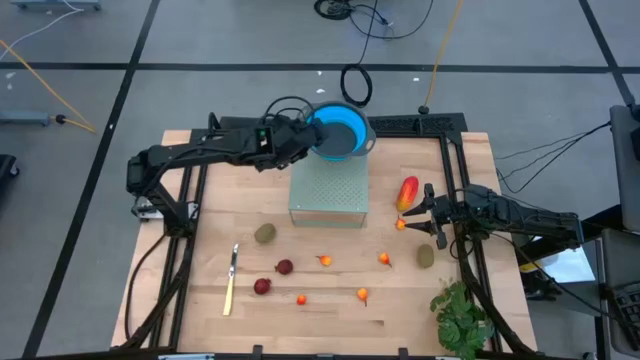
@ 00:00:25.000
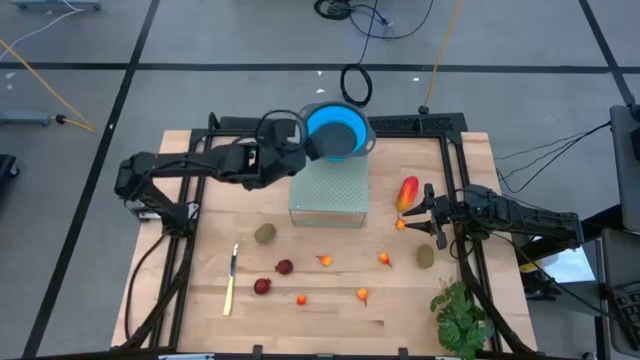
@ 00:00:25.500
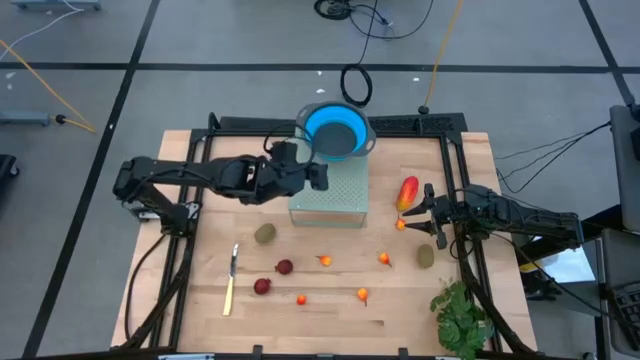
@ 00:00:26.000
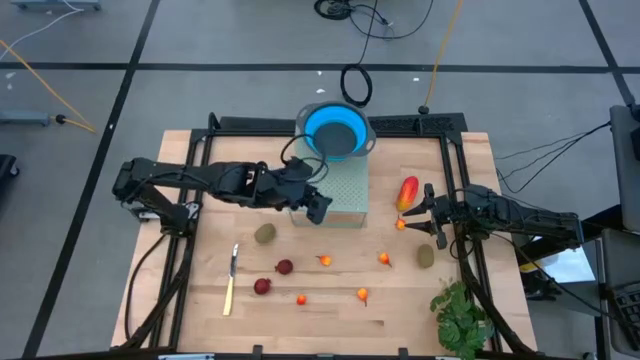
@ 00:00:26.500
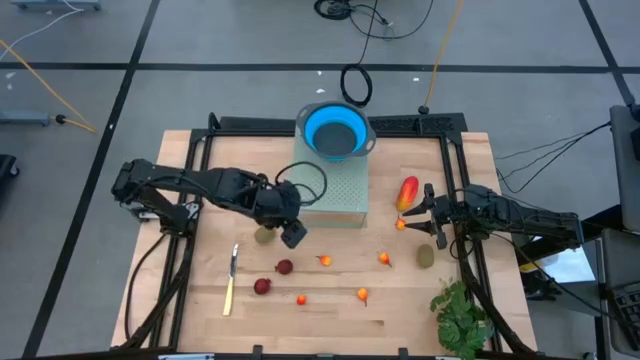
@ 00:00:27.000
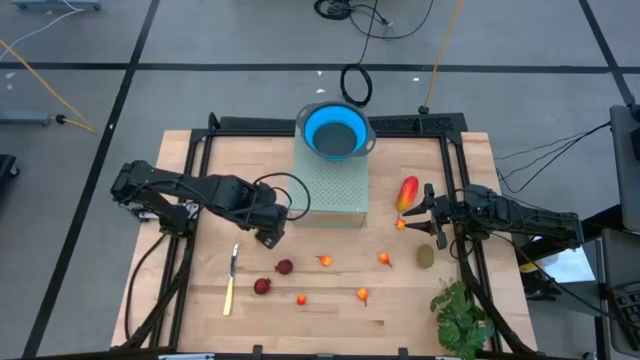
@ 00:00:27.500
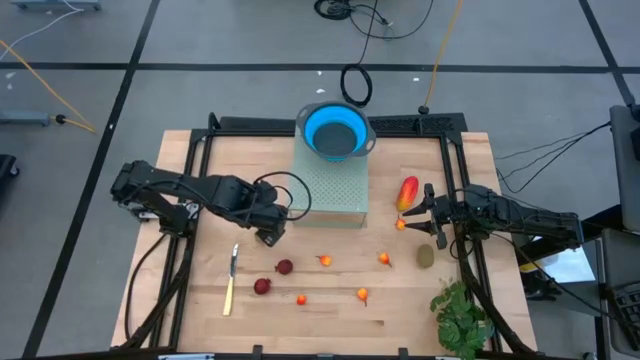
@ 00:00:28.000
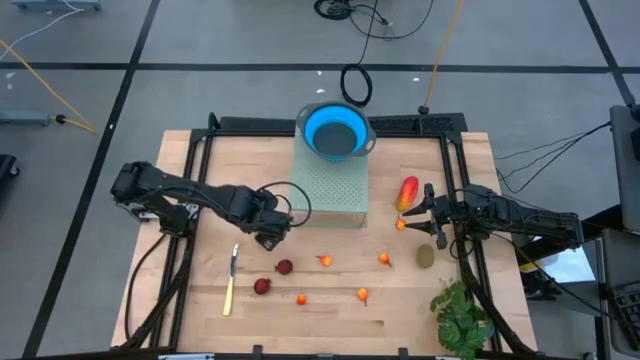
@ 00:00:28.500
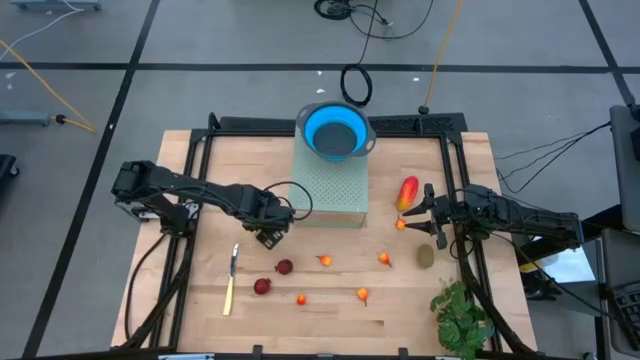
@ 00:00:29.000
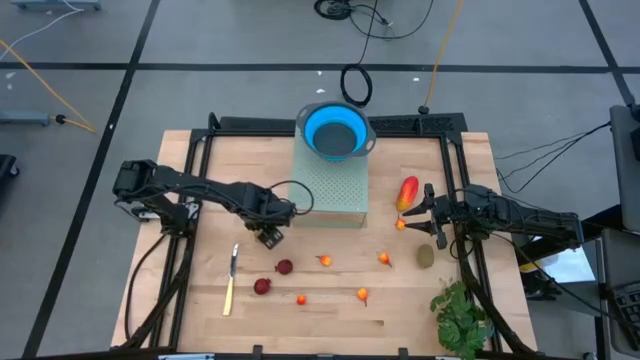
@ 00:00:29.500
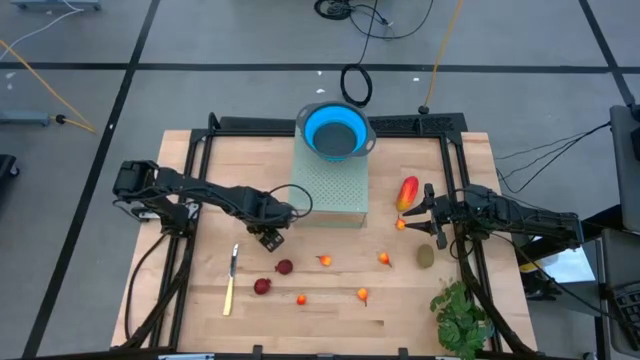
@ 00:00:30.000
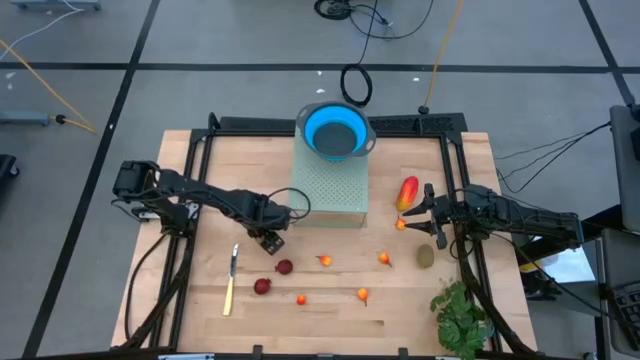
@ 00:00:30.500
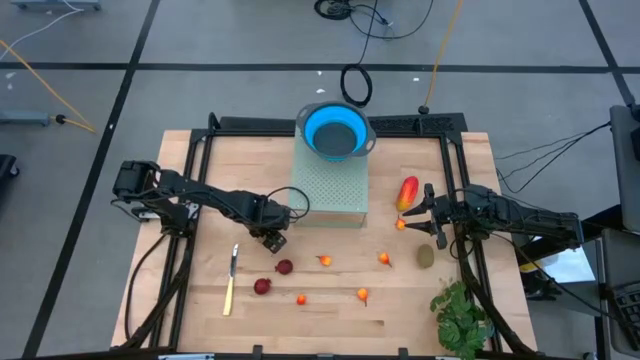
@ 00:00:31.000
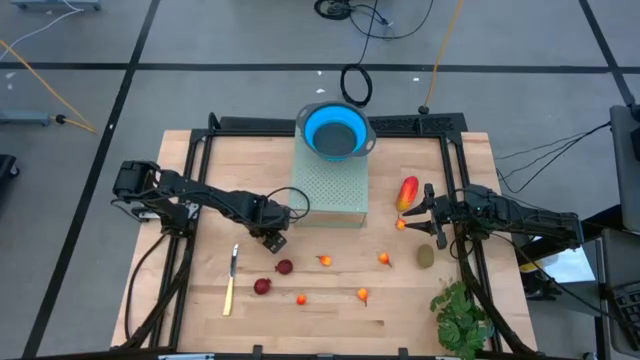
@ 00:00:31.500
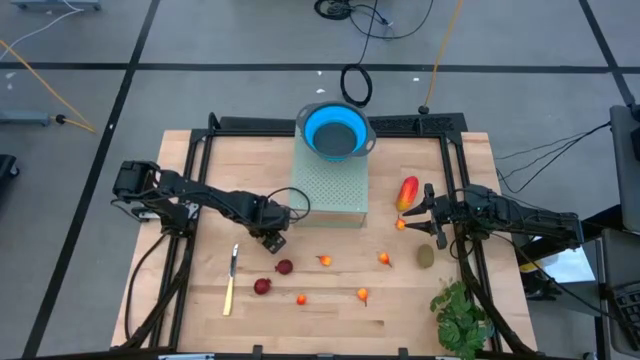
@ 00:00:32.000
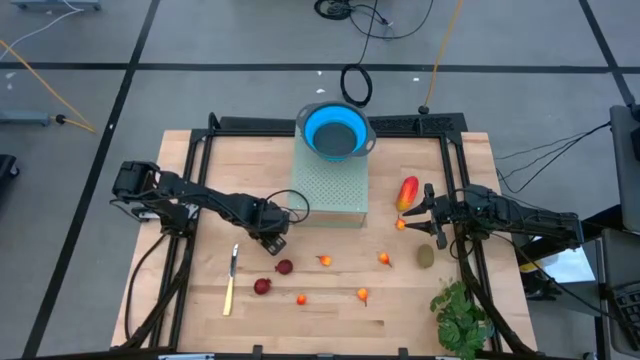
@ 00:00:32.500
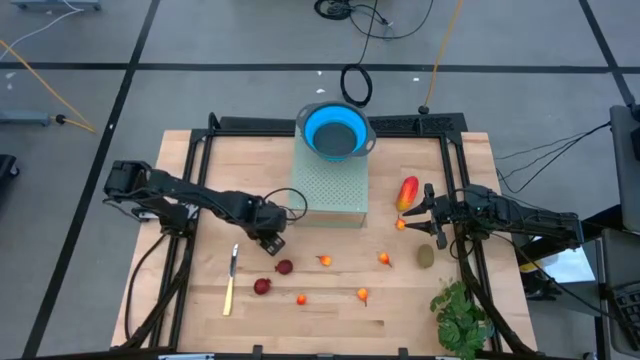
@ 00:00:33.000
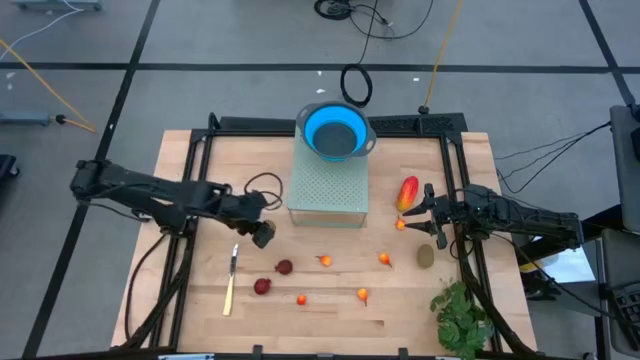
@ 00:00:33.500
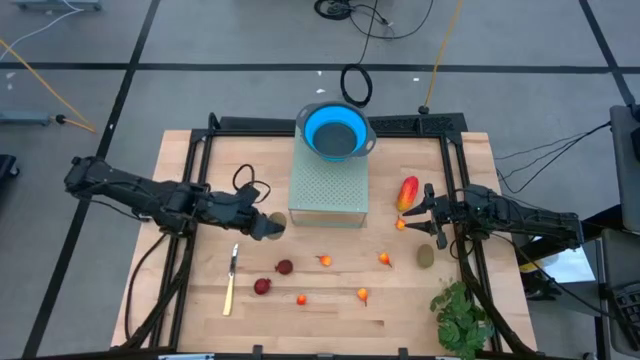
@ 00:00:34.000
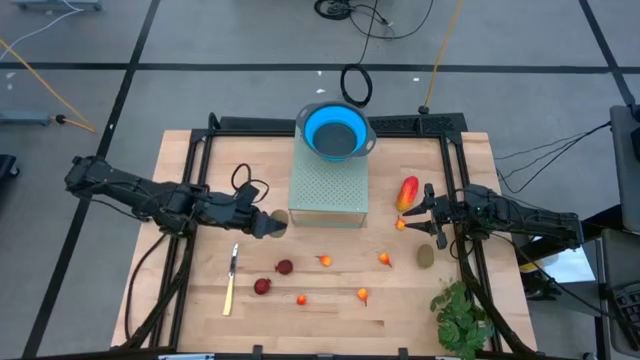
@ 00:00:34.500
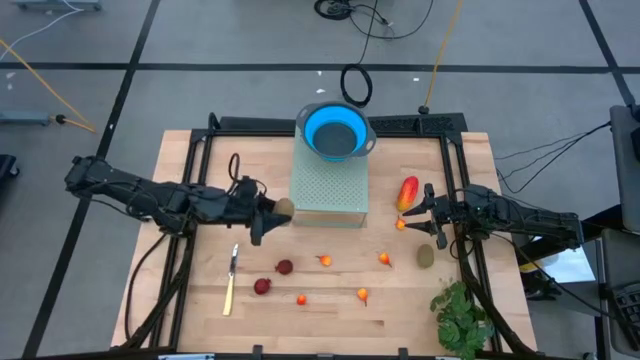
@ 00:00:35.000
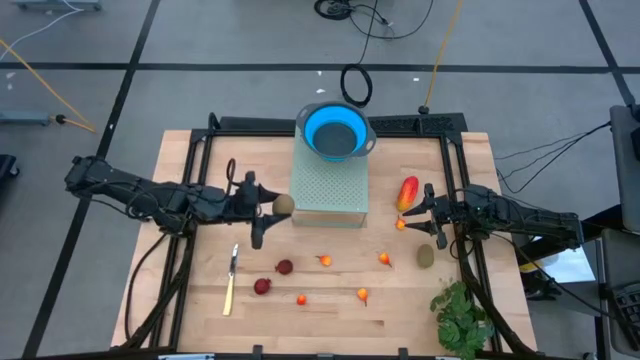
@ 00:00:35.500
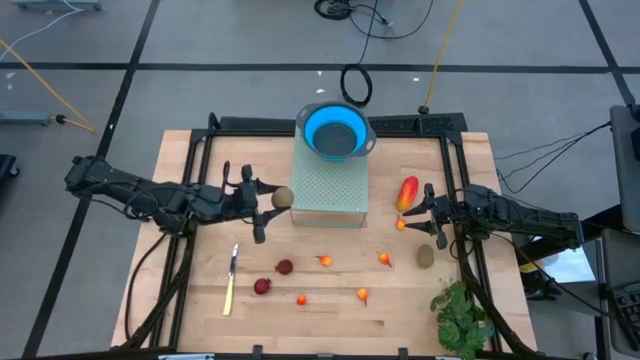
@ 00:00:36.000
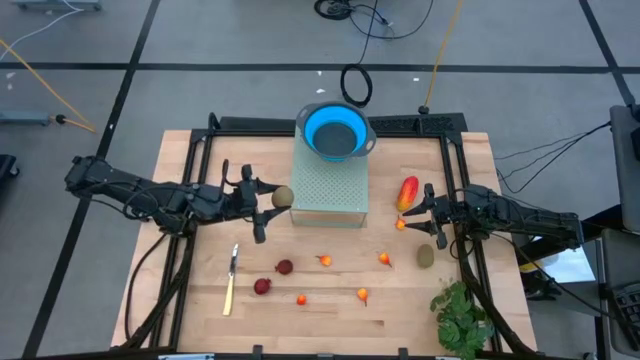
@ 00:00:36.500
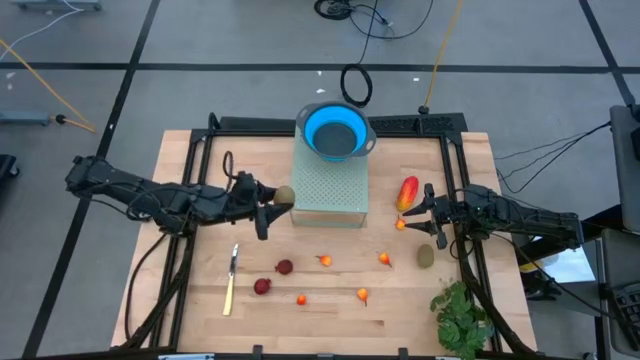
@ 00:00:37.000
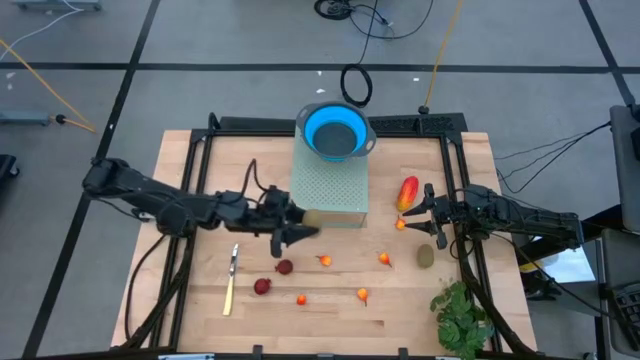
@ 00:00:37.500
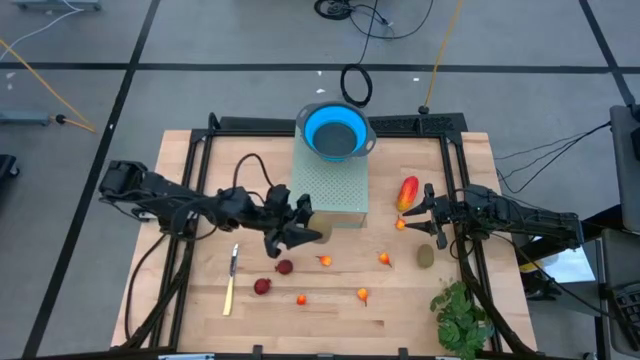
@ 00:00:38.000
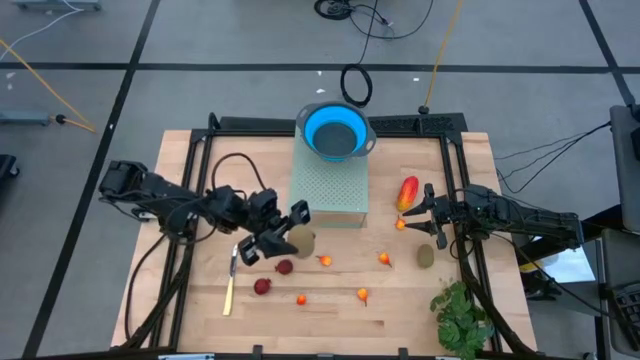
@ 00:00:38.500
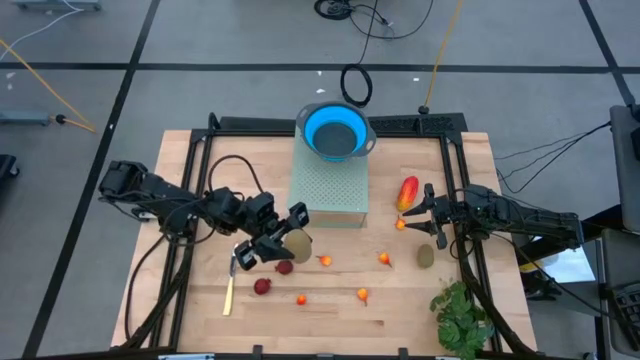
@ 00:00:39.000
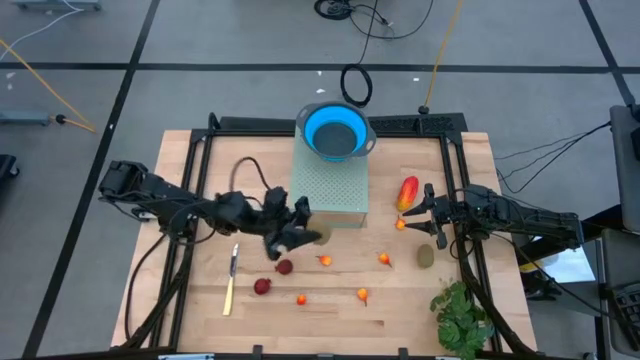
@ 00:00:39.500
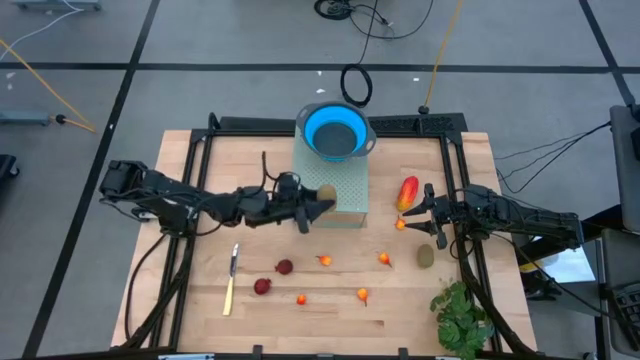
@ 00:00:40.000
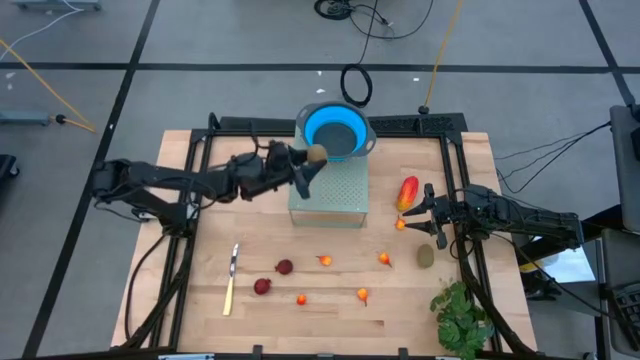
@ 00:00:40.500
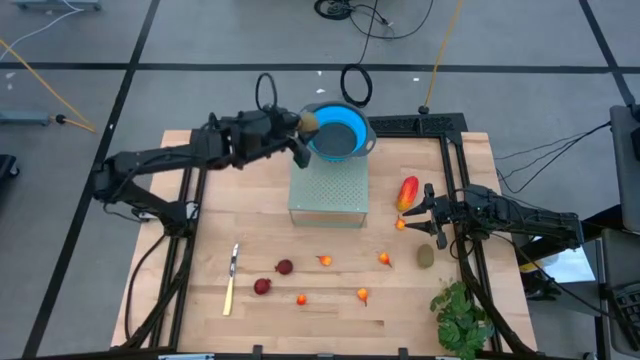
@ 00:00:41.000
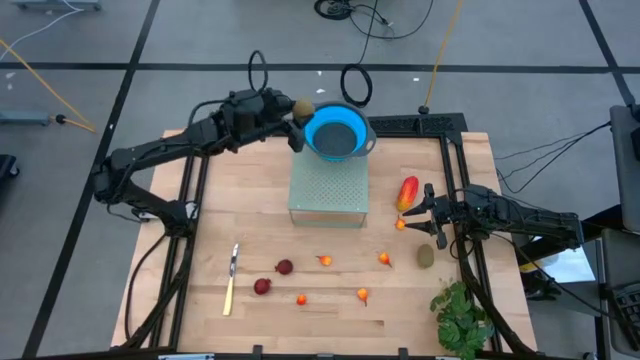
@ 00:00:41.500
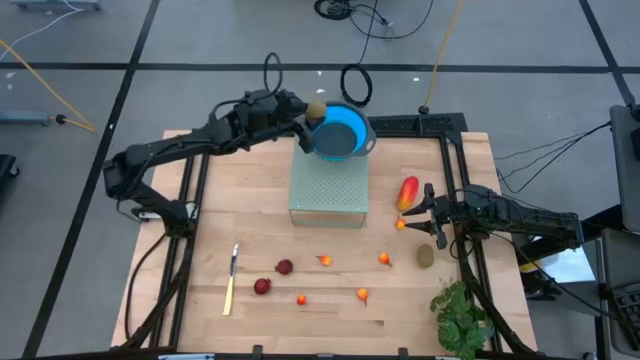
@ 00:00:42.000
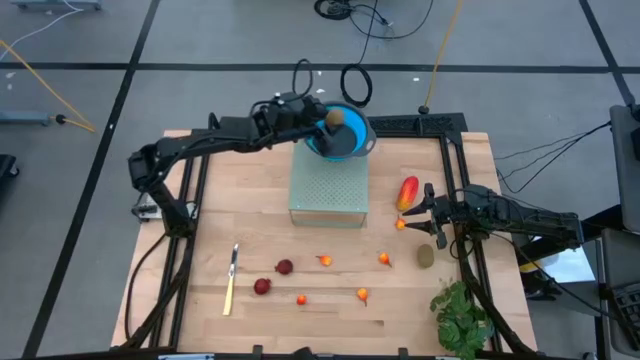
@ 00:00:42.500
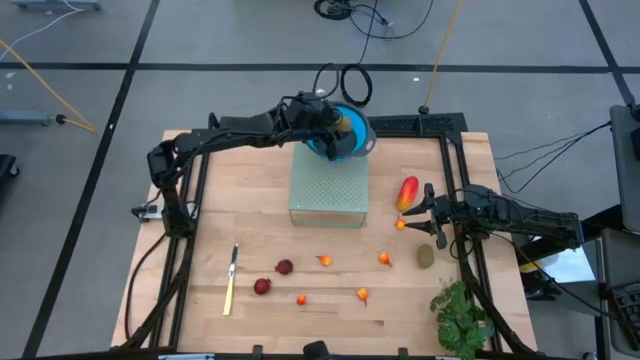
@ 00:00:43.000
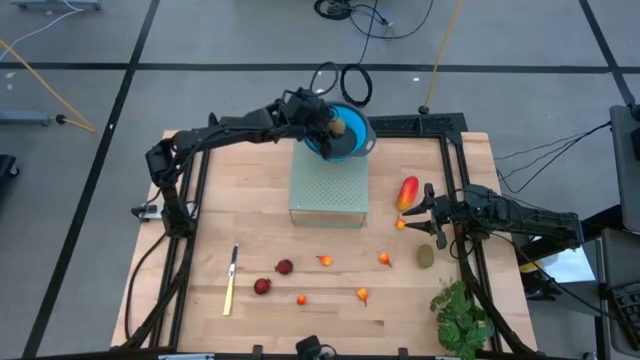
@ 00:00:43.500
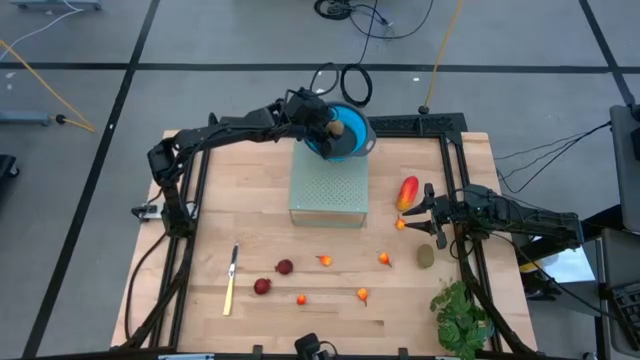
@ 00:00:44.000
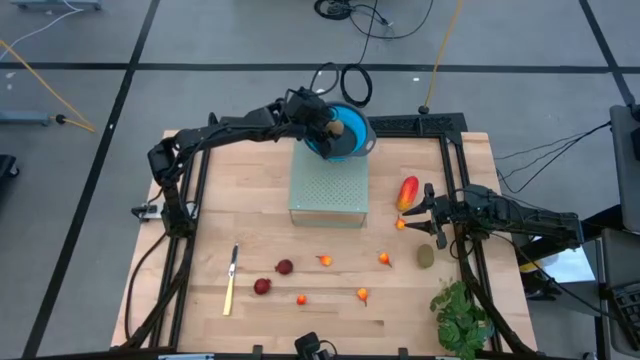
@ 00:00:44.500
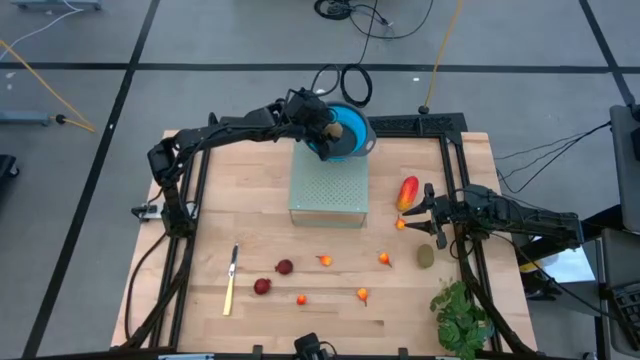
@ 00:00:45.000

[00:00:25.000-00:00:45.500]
Task: Pick & Place Fruit
Put the kiwi into the blue strainer bowl on the shelf
